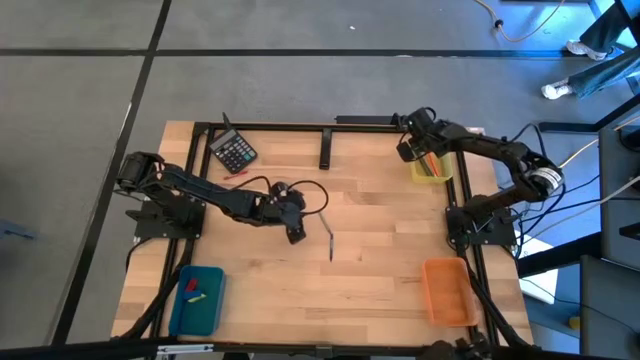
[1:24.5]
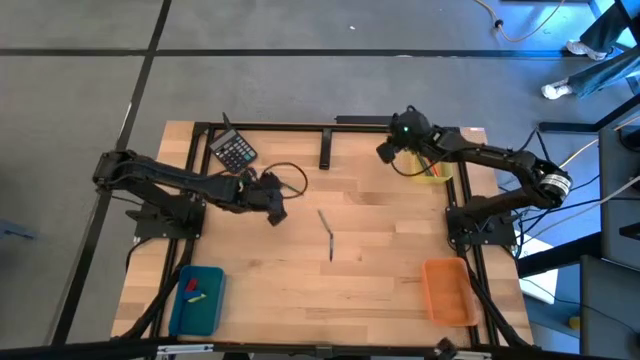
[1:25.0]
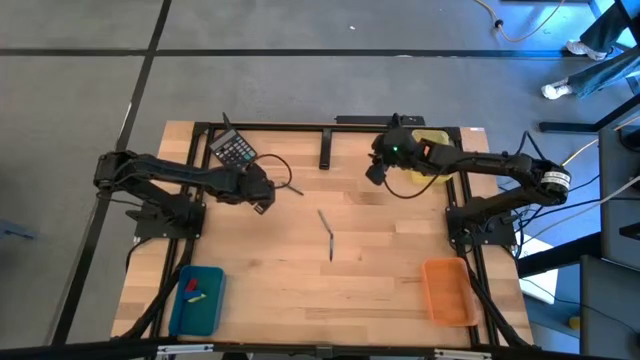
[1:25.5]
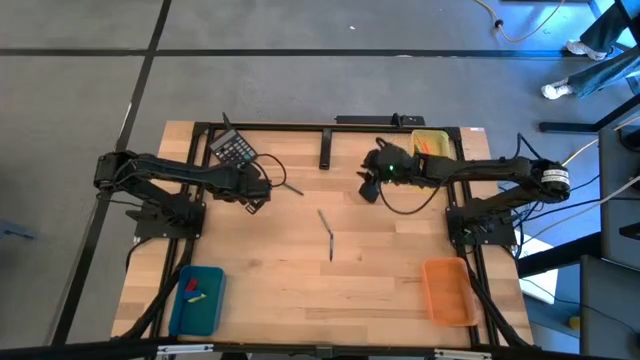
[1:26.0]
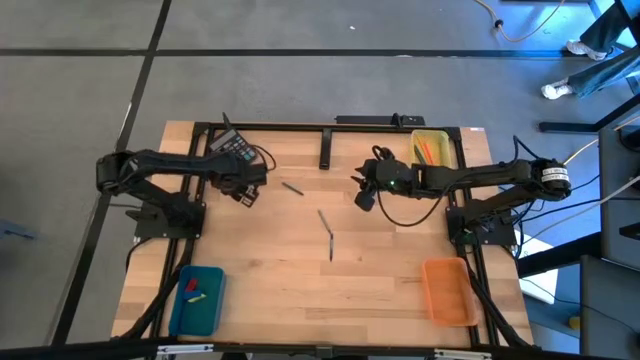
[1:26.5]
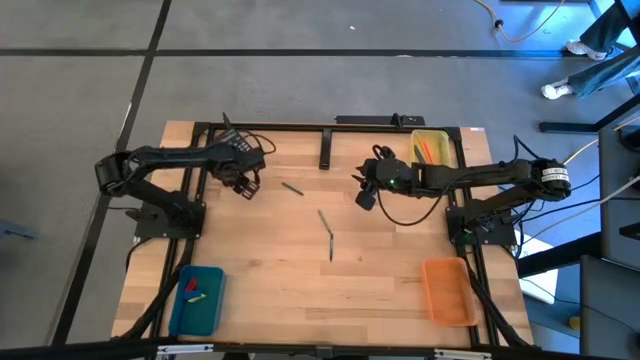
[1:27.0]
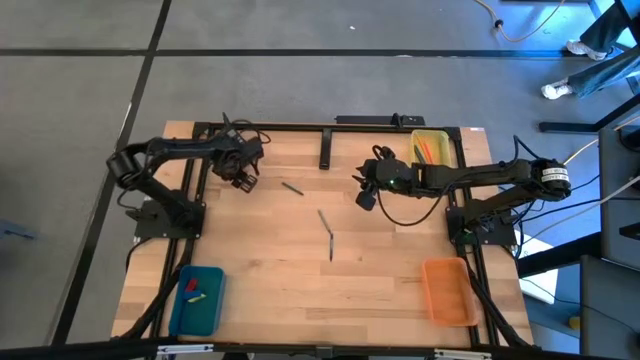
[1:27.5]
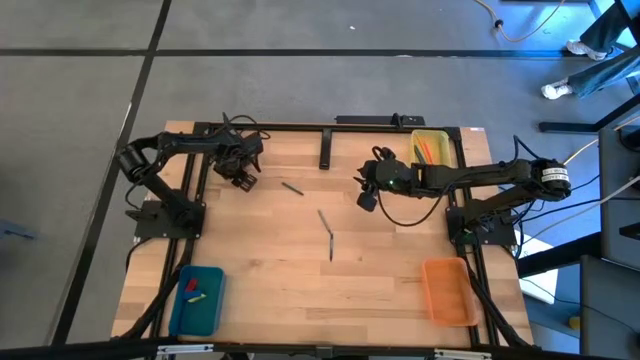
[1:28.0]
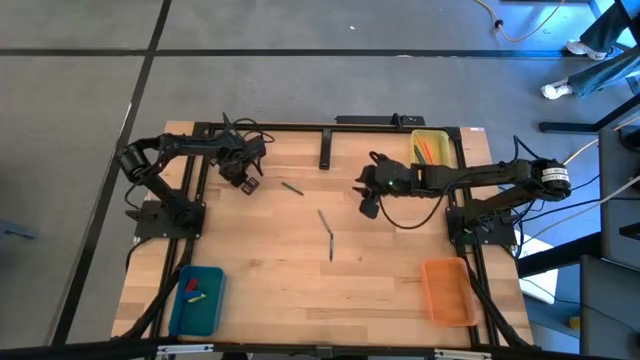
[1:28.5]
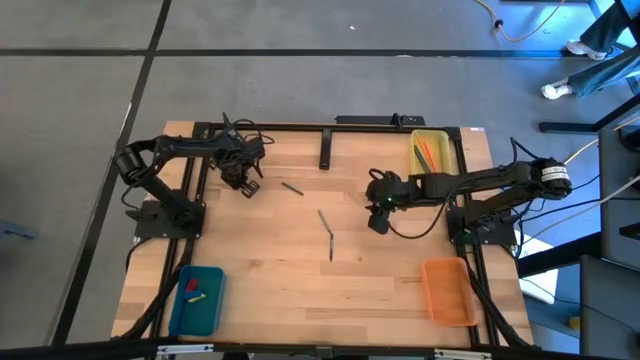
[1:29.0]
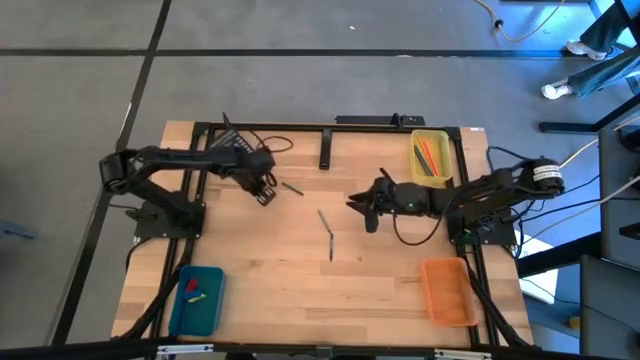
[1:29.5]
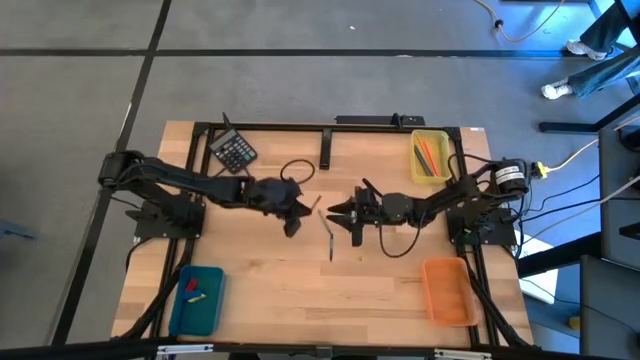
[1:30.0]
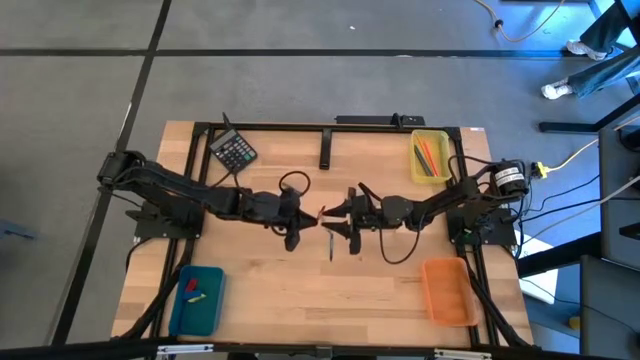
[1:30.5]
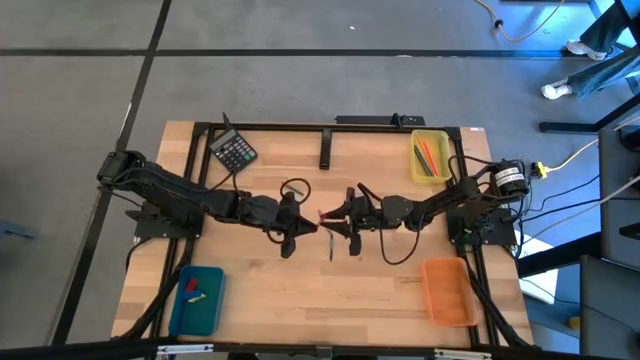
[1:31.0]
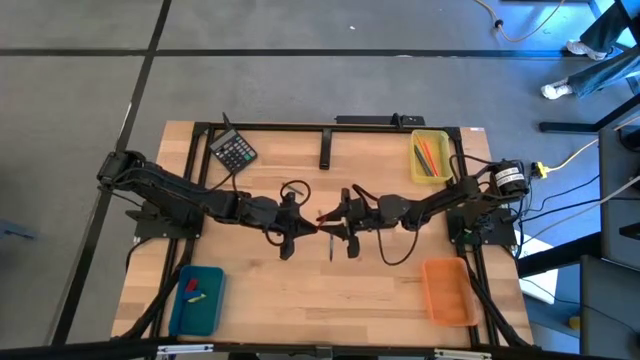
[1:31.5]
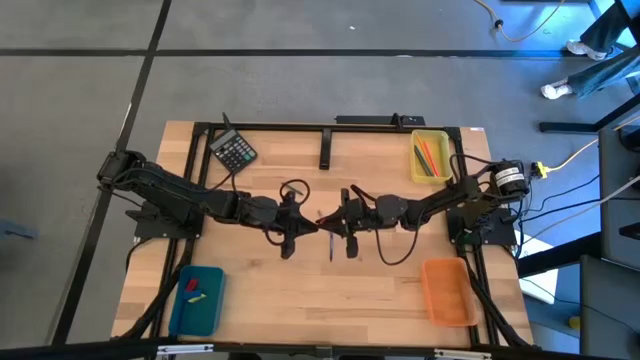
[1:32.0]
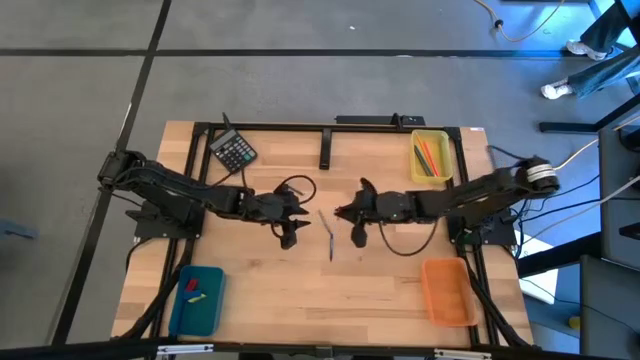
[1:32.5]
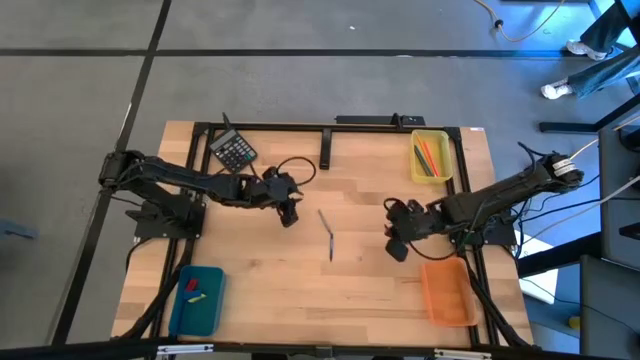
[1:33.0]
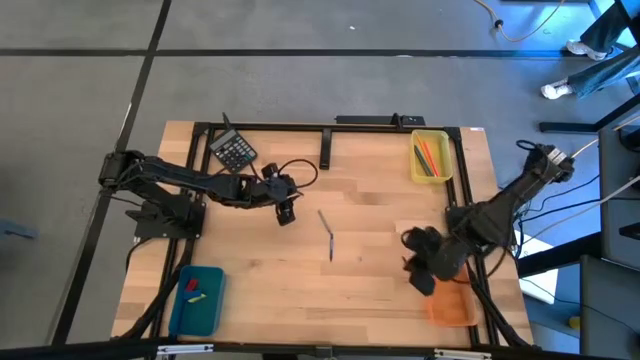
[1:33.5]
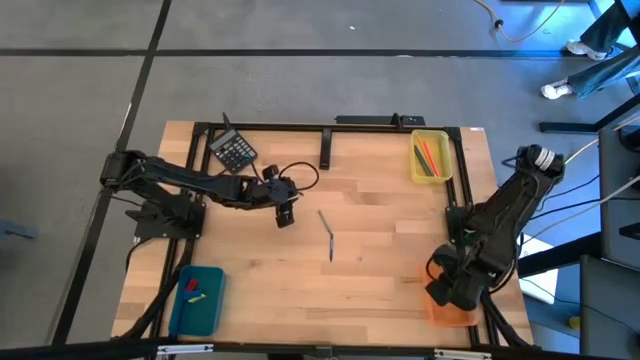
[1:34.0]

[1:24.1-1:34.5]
Task: Sort crayons/erasers/pens/pencils in bins
Put the red crayon into the orange bin

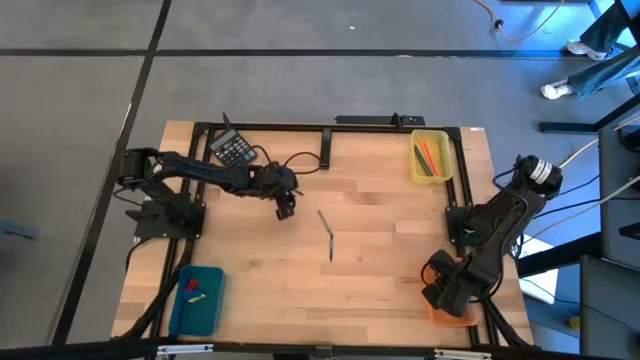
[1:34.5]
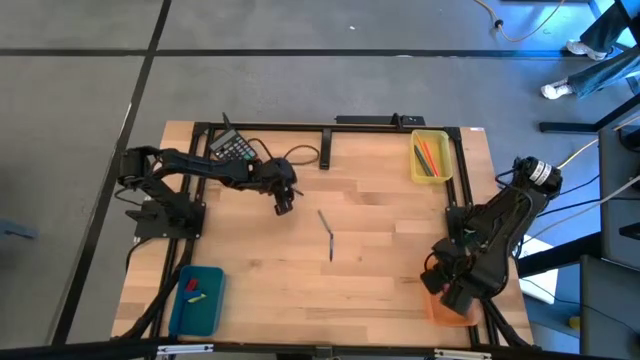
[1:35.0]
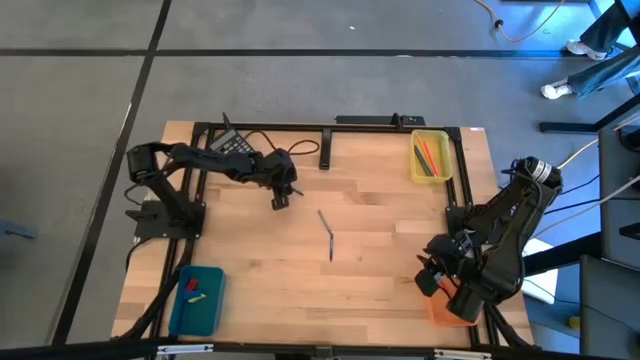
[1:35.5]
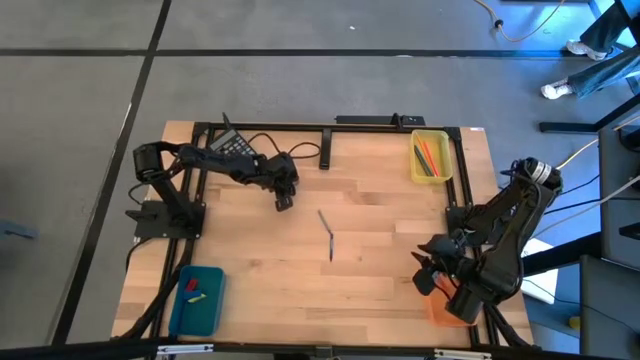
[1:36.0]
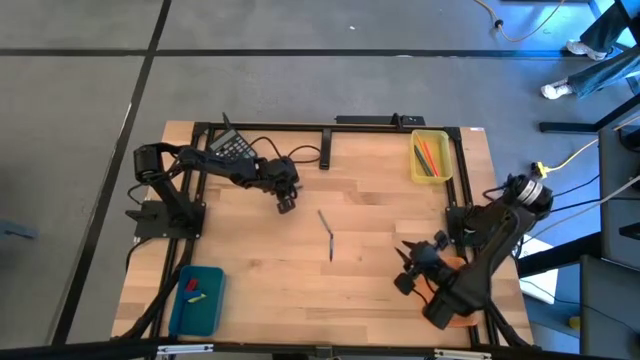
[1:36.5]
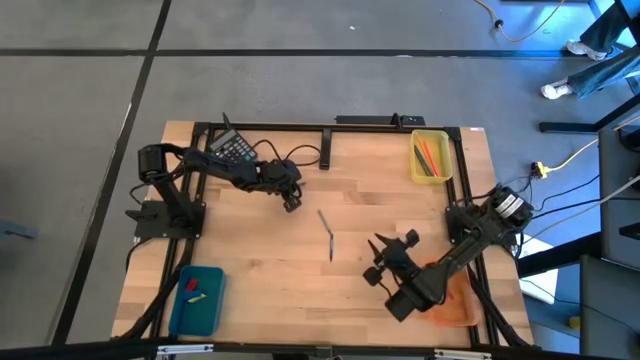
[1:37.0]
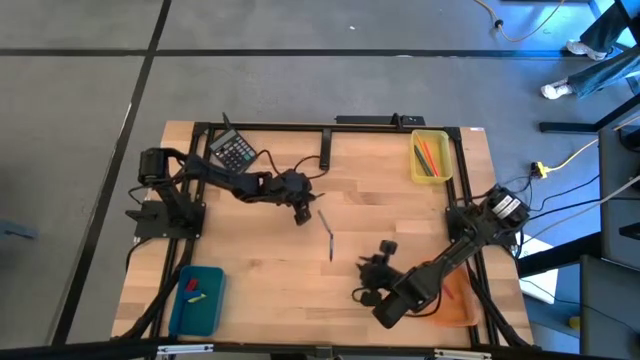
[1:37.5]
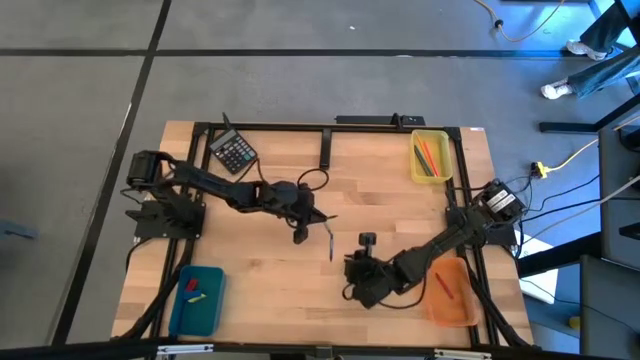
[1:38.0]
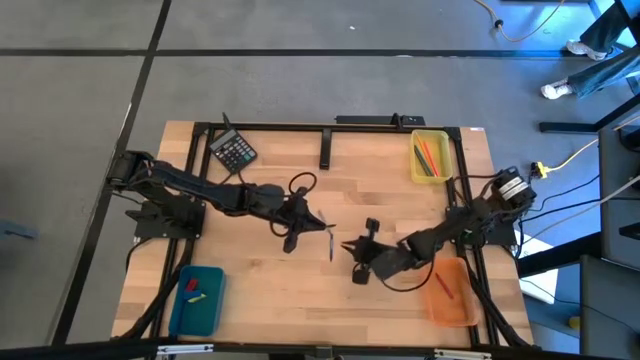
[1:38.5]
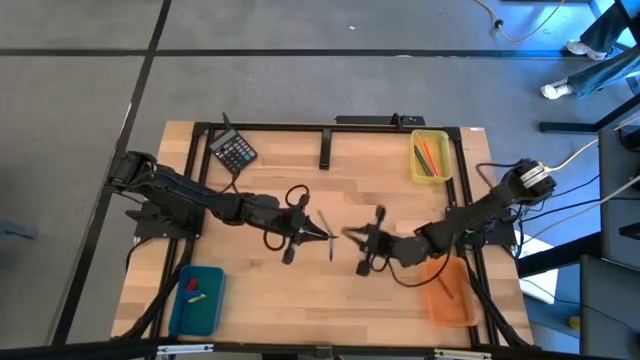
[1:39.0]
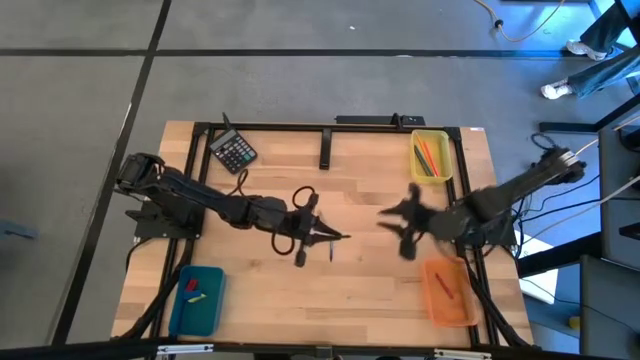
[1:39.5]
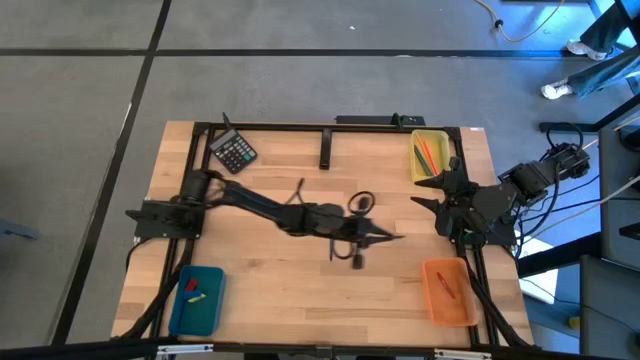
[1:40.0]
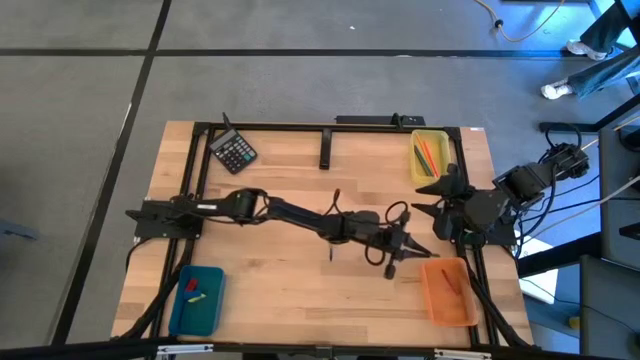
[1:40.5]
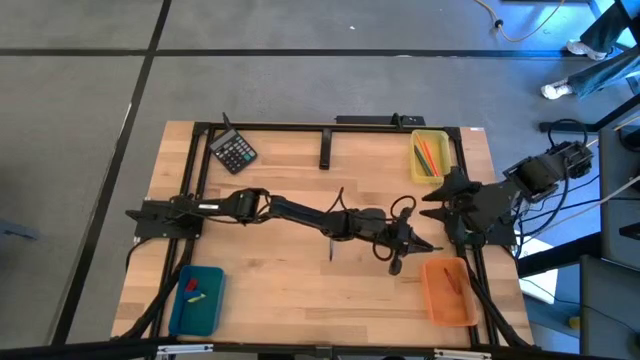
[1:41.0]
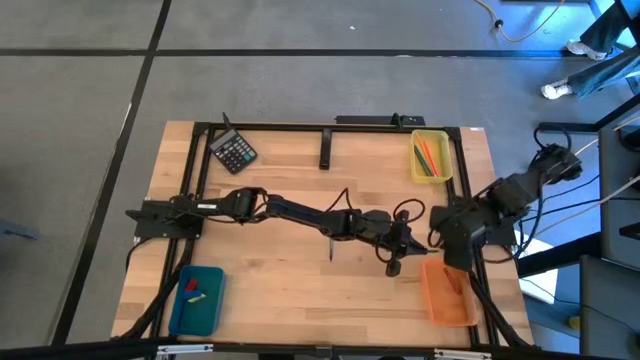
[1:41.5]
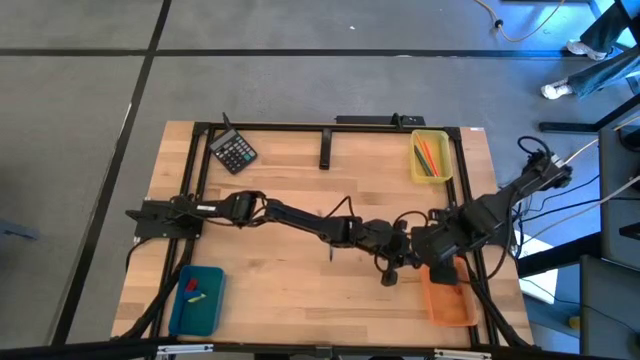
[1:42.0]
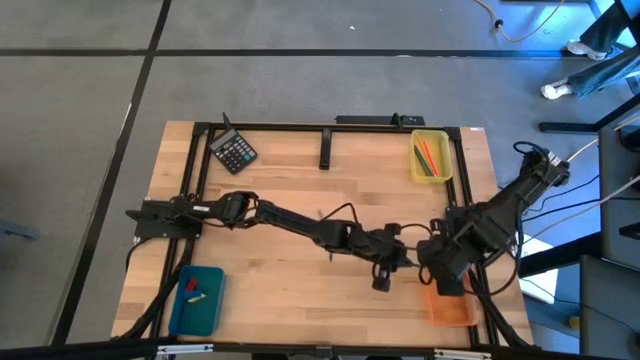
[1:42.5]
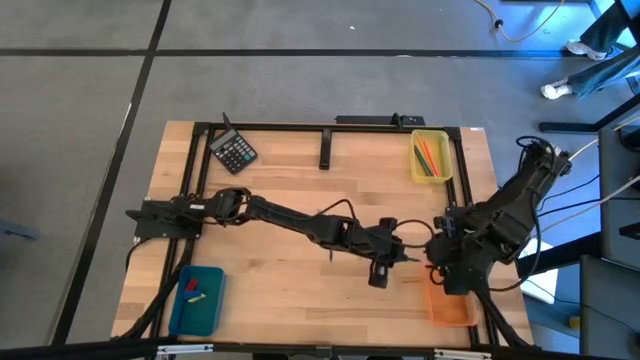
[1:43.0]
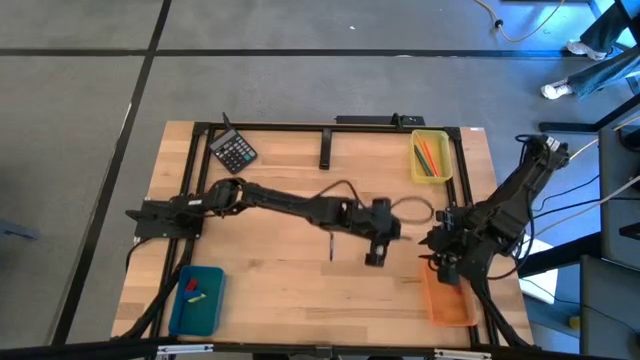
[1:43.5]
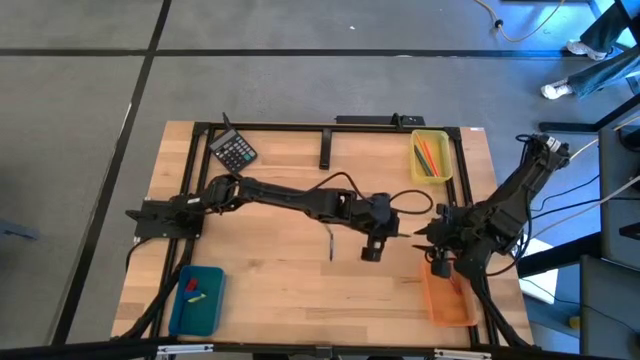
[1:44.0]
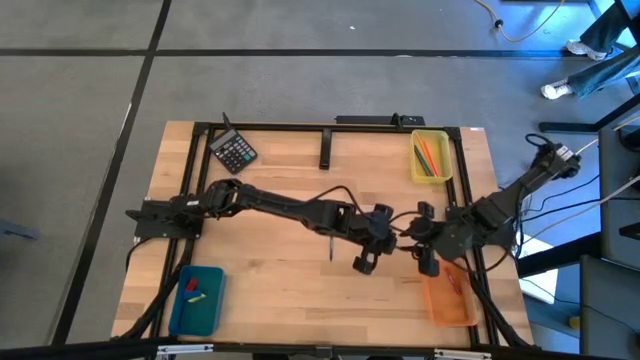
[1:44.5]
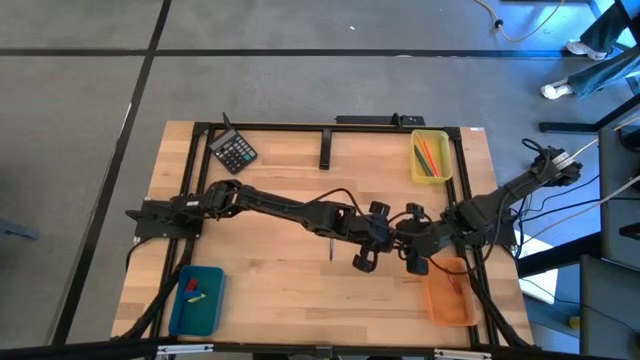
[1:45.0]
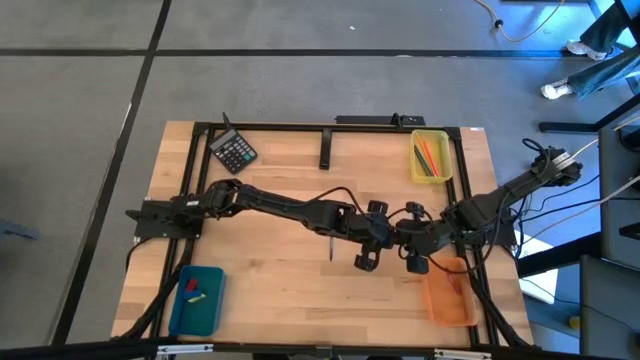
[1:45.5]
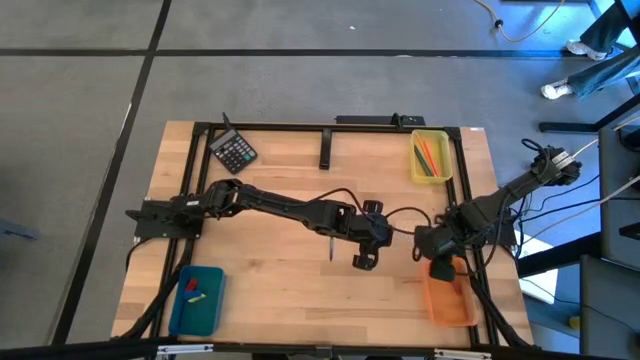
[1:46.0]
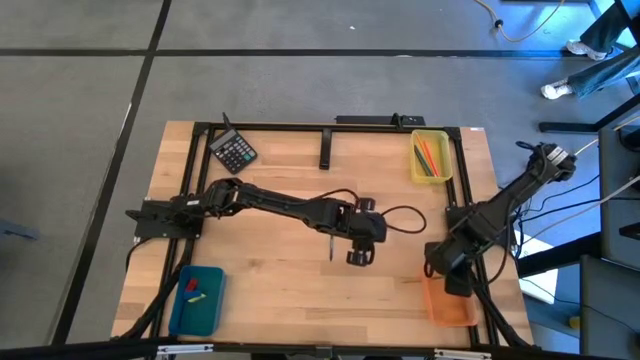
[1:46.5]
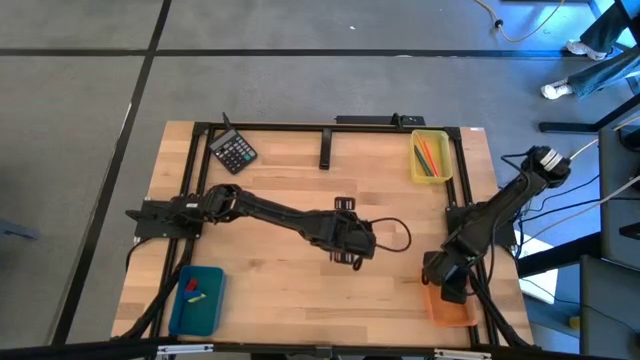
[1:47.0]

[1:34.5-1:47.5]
Put the green crayon into the orange bin
